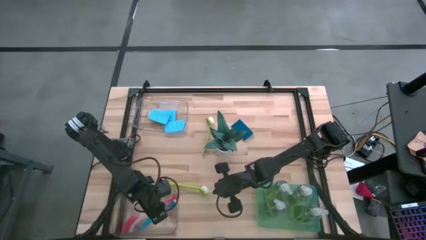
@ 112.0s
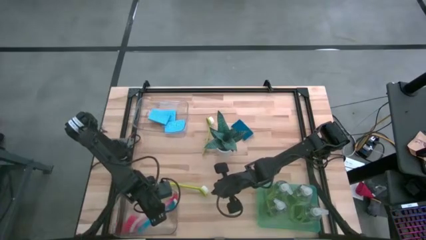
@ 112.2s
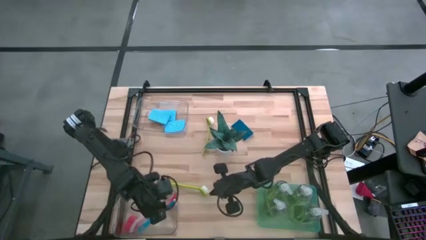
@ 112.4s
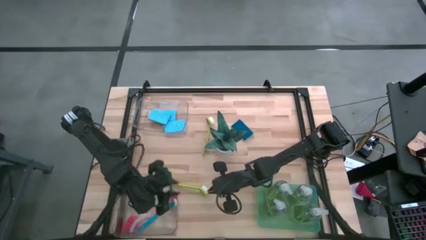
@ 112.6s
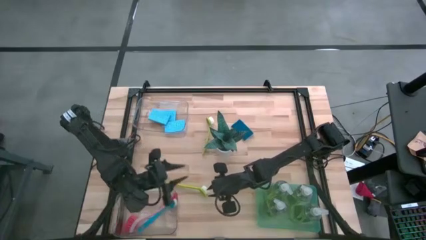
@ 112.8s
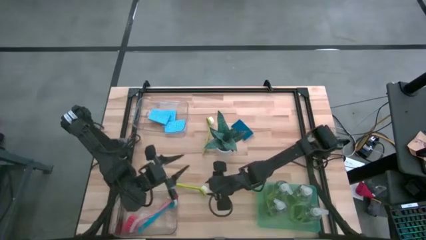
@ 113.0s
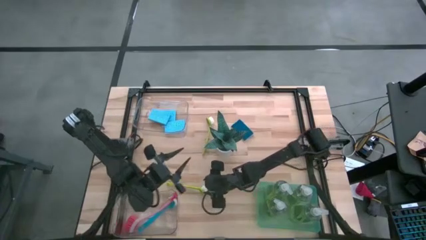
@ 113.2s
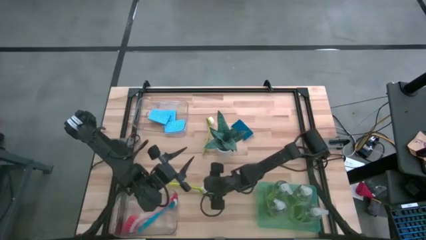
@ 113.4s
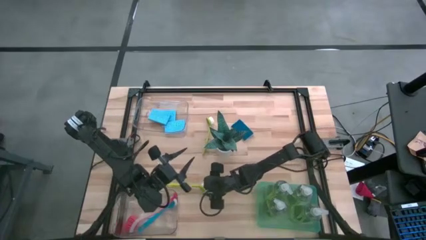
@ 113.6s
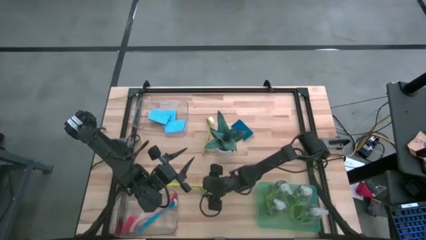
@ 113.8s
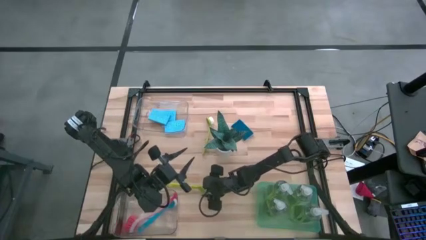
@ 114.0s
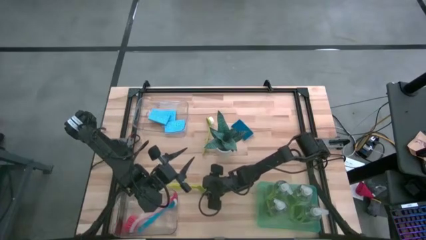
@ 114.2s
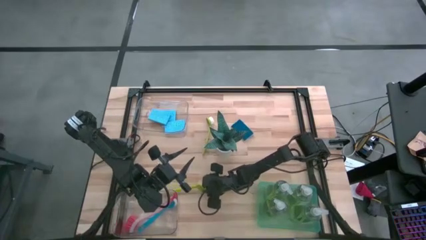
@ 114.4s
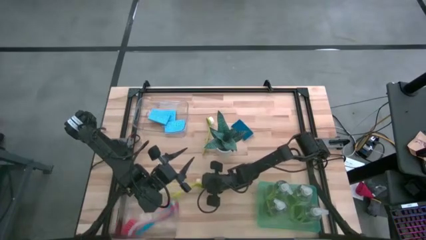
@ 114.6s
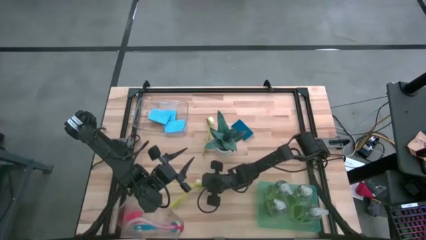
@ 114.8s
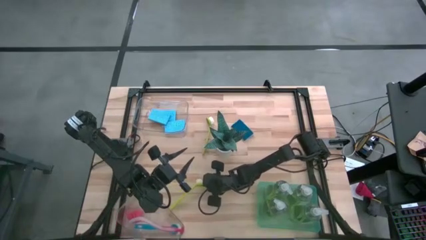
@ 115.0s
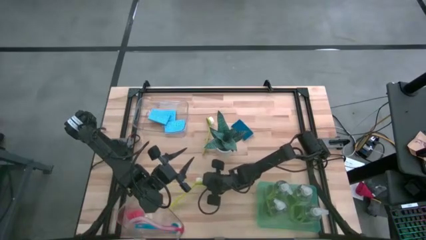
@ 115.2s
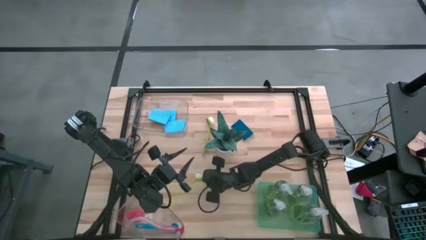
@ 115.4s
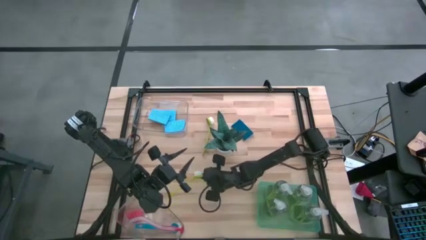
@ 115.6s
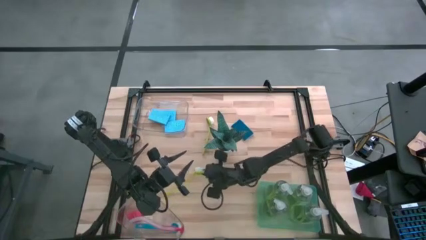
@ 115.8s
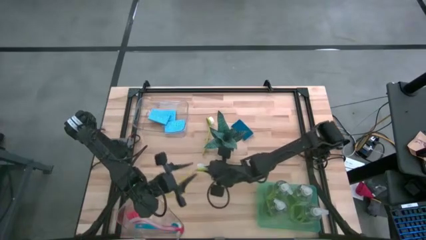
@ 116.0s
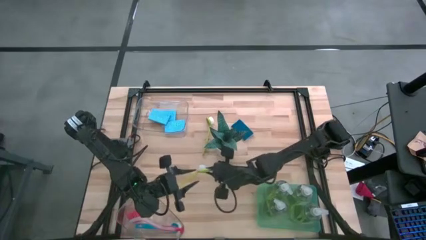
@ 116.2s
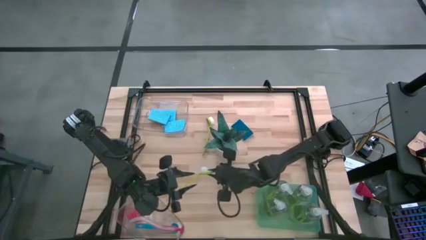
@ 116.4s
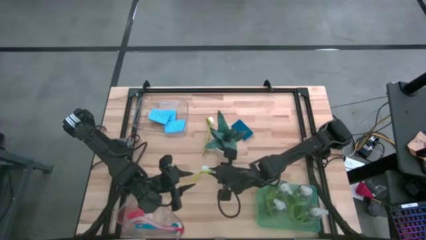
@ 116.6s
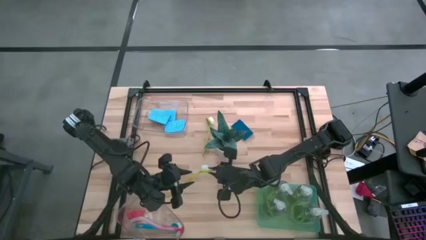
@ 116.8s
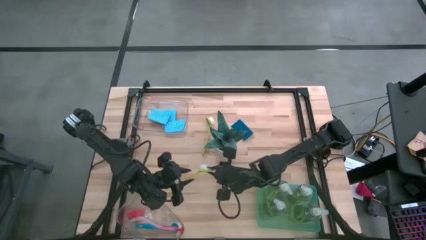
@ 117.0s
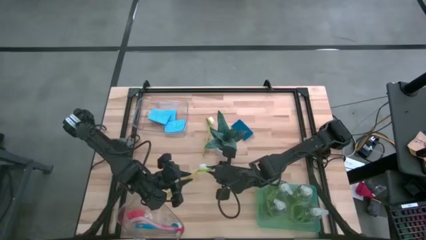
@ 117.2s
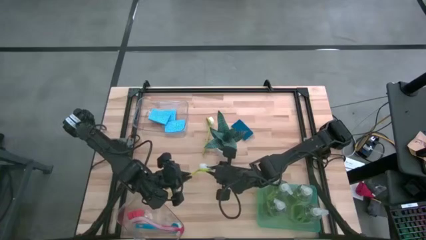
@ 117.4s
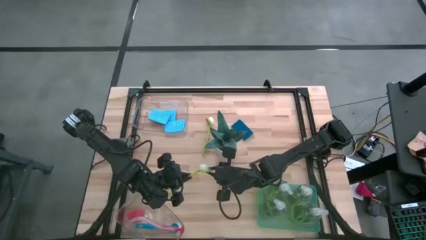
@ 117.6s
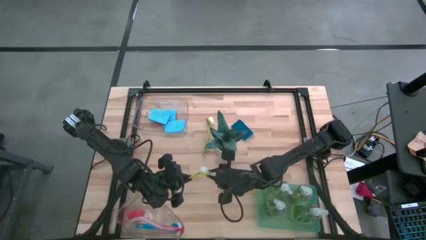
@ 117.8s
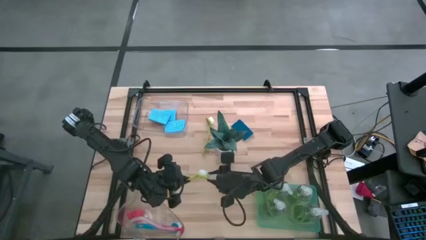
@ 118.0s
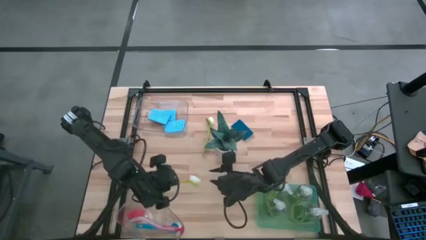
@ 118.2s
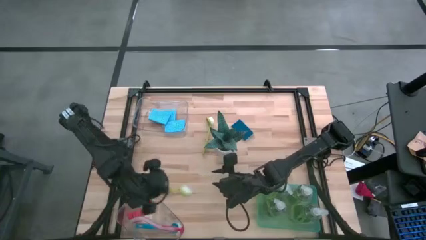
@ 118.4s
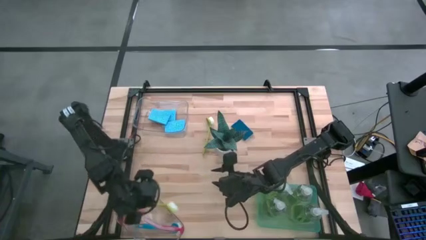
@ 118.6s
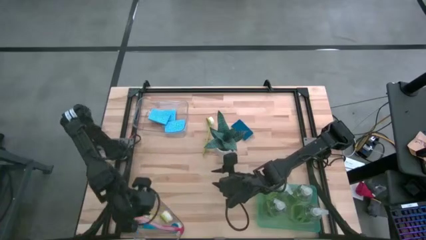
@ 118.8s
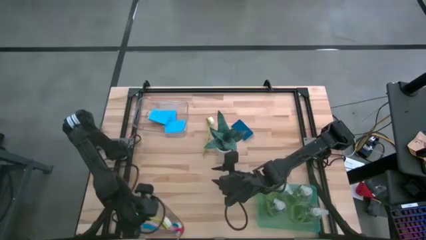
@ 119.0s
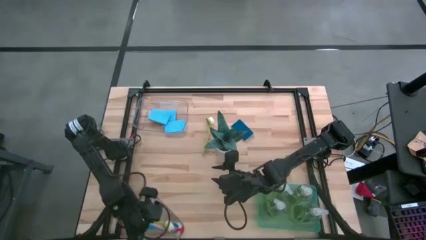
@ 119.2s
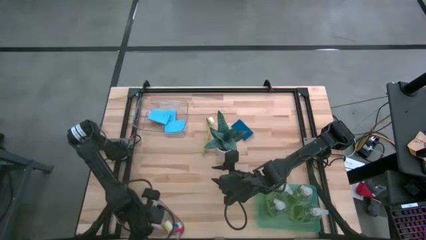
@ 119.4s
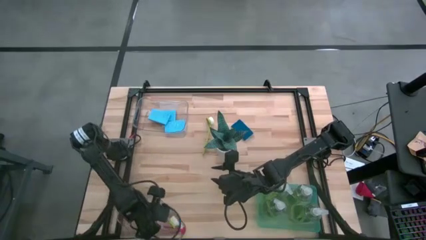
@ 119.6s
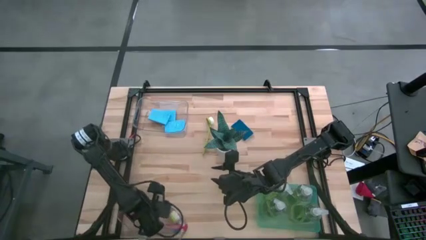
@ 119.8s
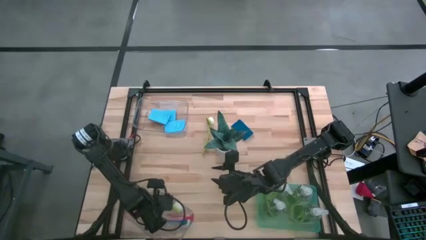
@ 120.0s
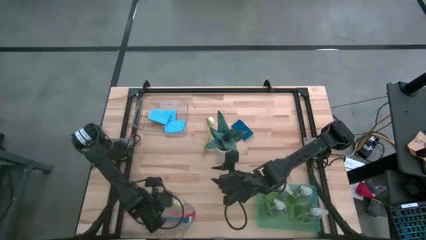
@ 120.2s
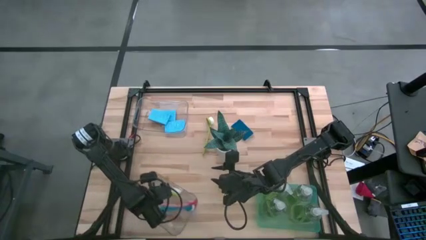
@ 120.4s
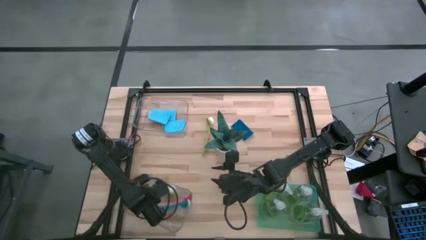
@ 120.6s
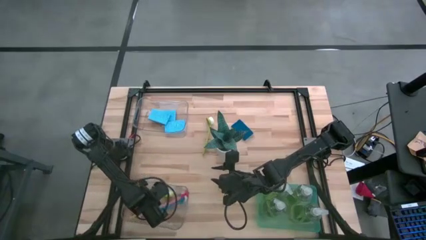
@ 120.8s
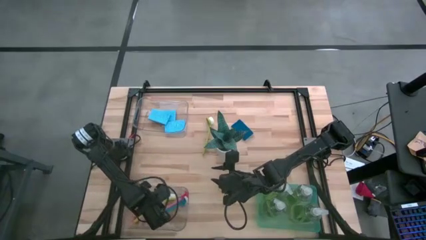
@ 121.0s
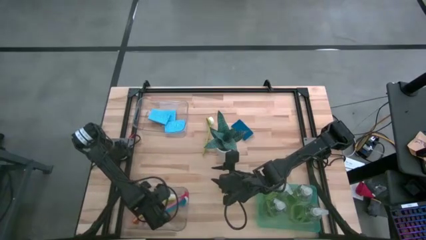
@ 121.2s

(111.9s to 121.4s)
Task: Pick & Place Kitchen Sink Supplies
Put the yellow dish brush into the bottom transparent bin

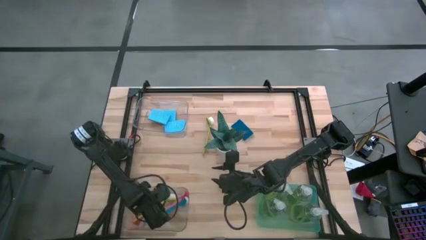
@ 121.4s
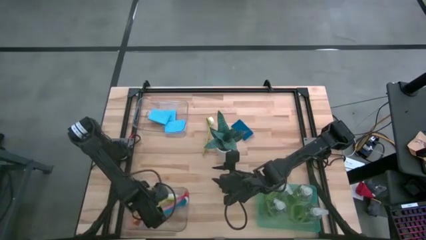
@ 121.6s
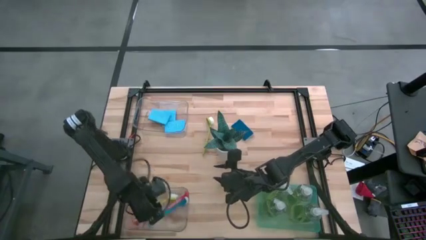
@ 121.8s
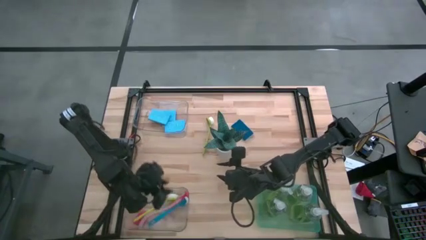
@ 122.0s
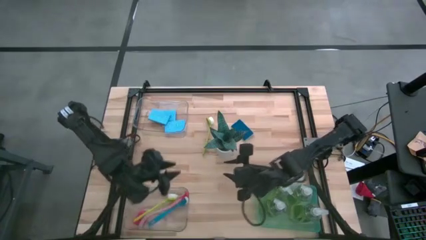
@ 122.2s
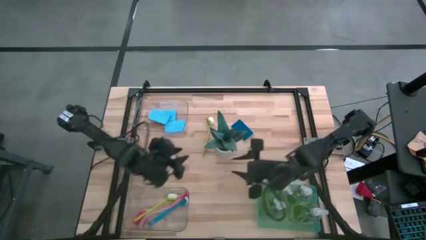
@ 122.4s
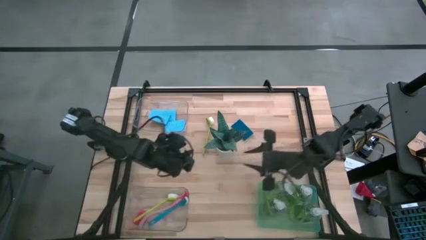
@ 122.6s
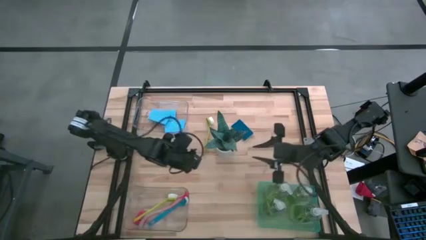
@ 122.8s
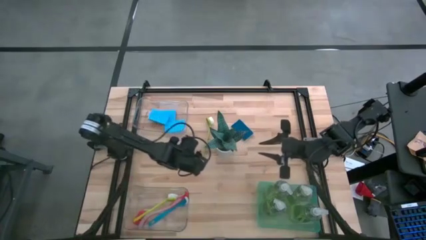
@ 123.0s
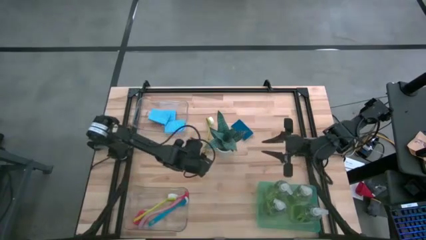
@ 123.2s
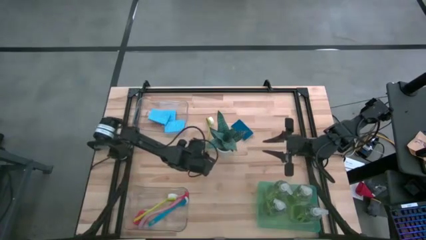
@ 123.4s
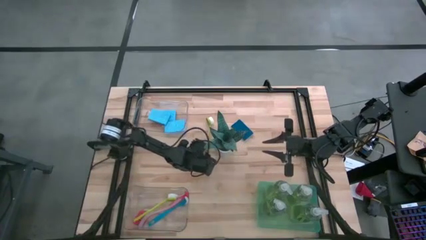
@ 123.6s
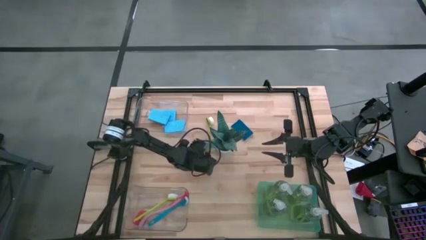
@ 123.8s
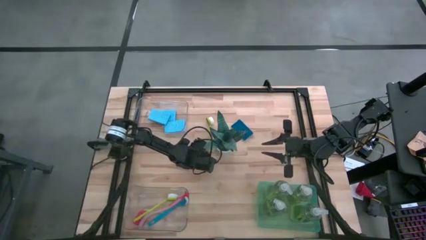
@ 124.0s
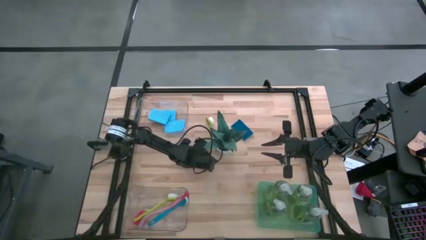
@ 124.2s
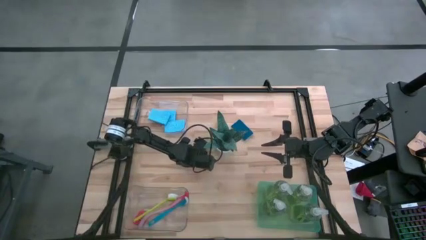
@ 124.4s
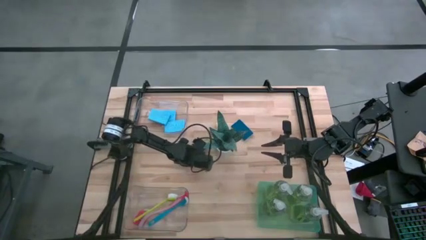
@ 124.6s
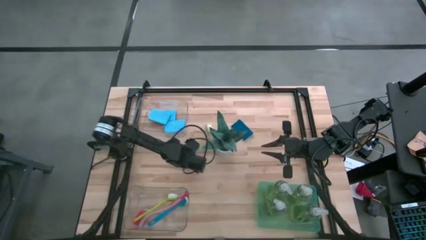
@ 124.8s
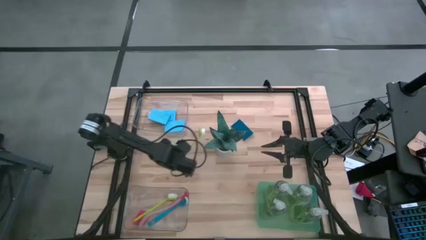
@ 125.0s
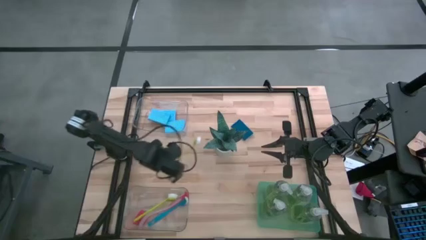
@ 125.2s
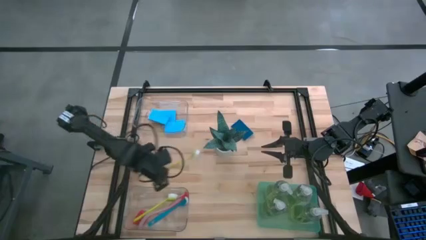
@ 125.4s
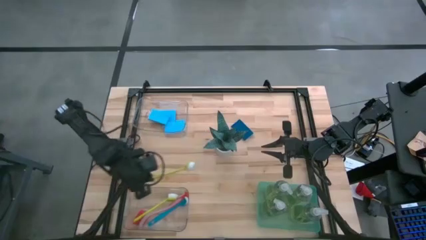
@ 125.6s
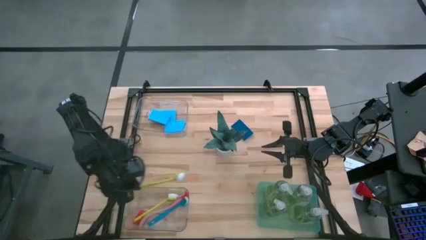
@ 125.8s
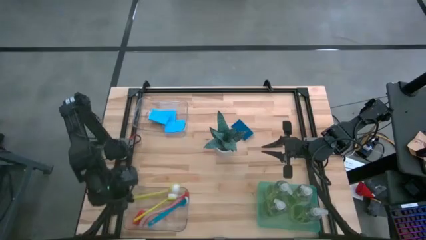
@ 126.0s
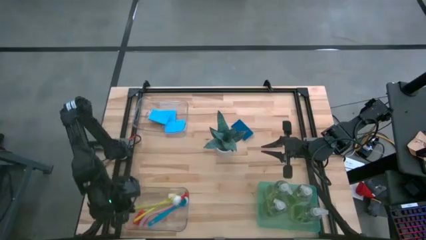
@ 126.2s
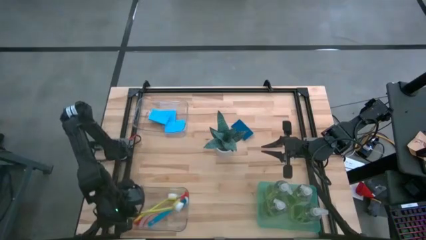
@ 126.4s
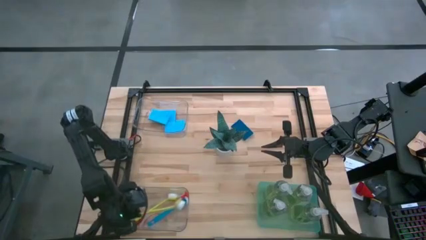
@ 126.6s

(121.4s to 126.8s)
Put the yellow dish brush into the bottom transparent bin

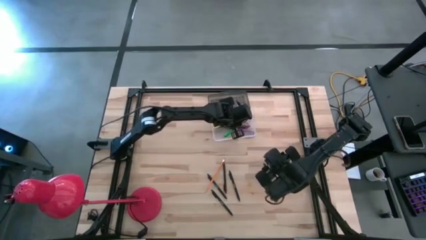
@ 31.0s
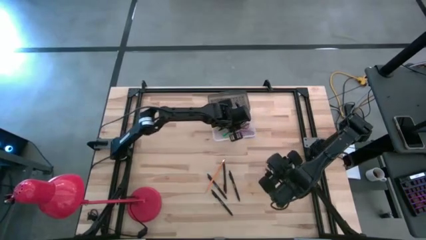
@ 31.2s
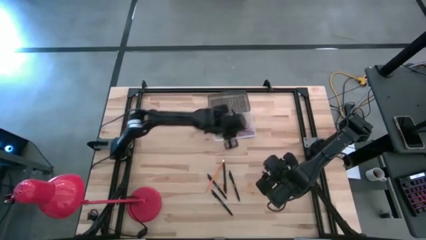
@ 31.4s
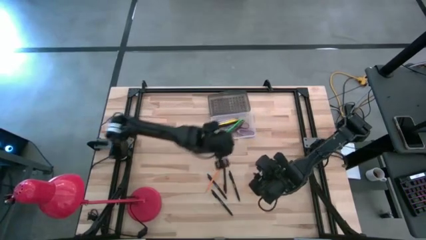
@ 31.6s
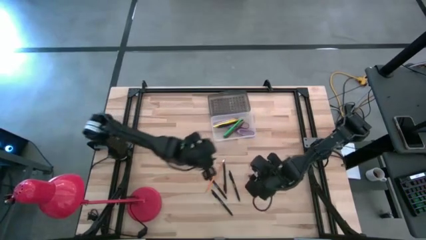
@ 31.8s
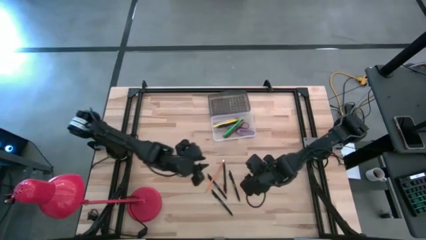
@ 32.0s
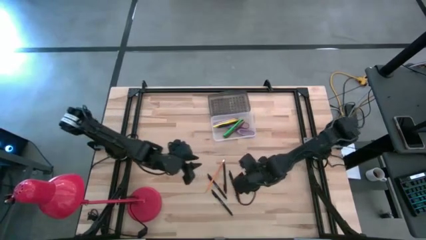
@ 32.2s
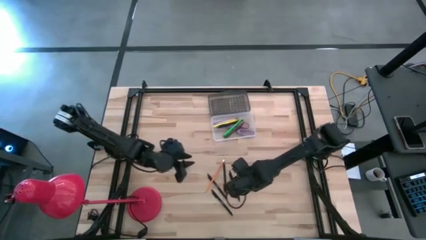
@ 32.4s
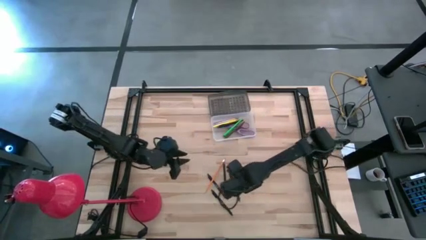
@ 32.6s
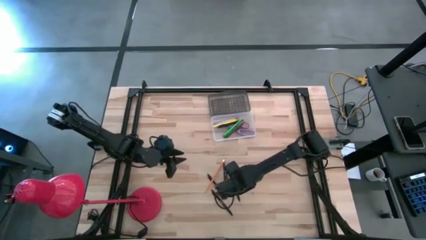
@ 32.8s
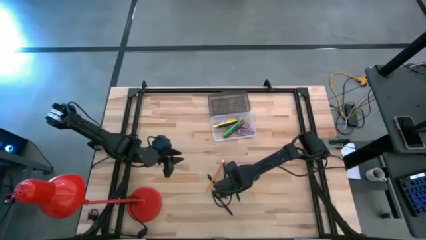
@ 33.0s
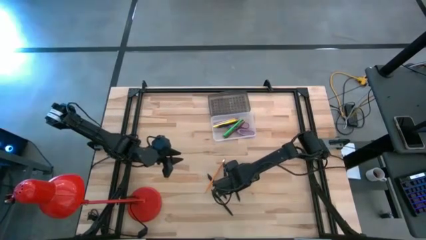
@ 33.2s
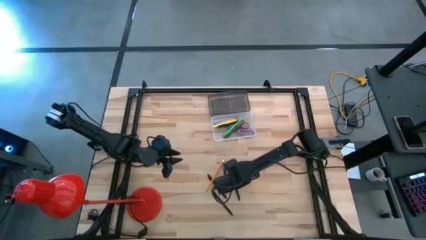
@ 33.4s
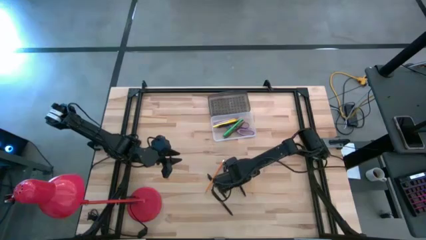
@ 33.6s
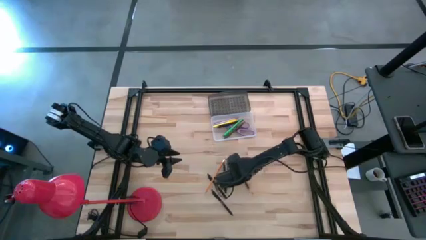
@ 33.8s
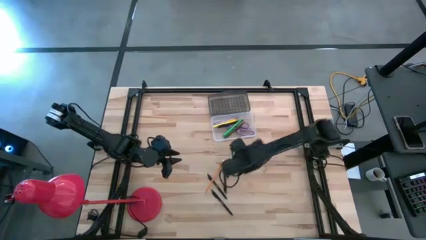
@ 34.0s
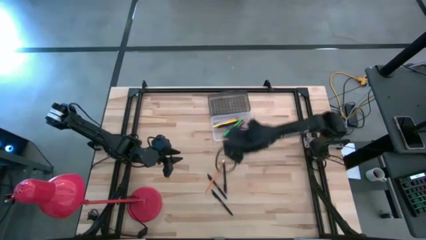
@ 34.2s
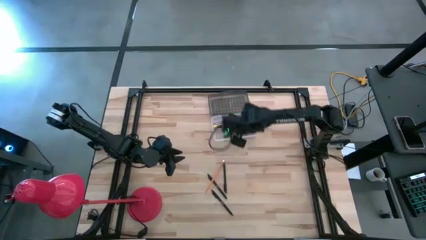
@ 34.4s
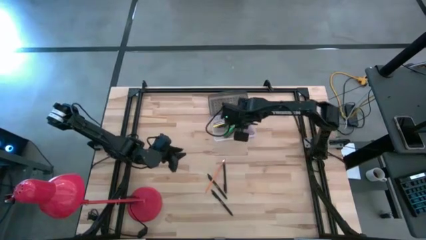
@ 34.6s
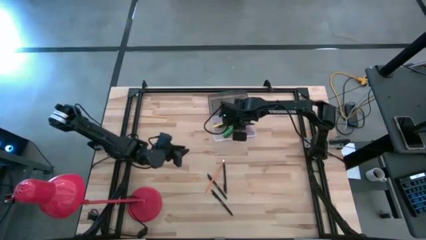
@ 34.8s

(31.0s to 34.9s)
Task: Pick & place school supplies into a supply box
Put the black ballpen into the gray supply box
